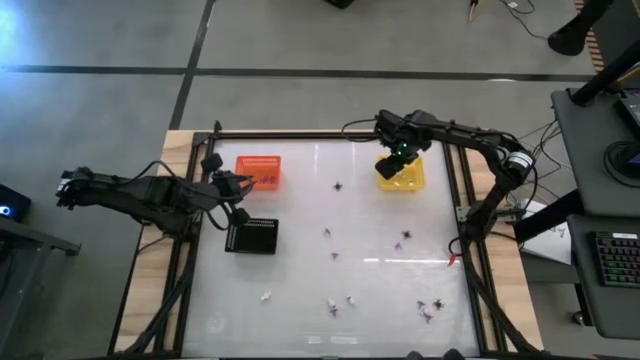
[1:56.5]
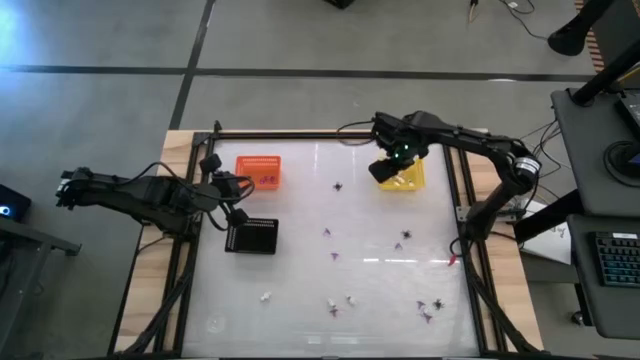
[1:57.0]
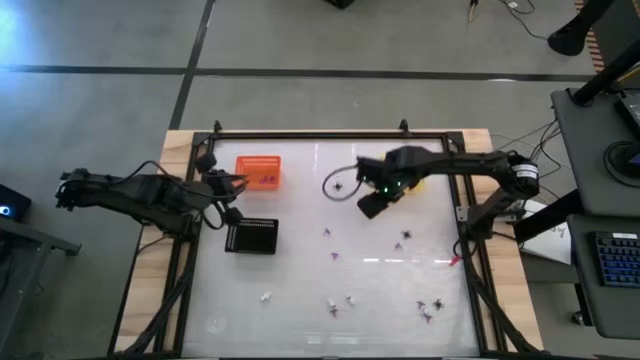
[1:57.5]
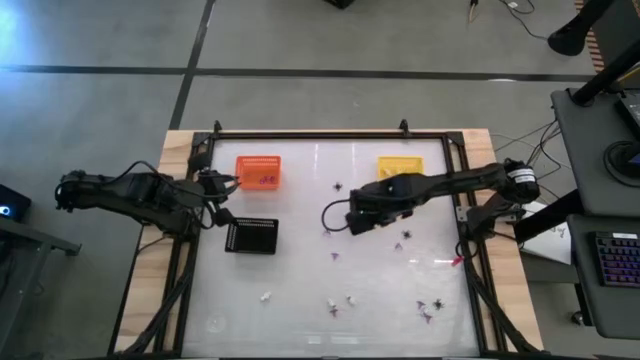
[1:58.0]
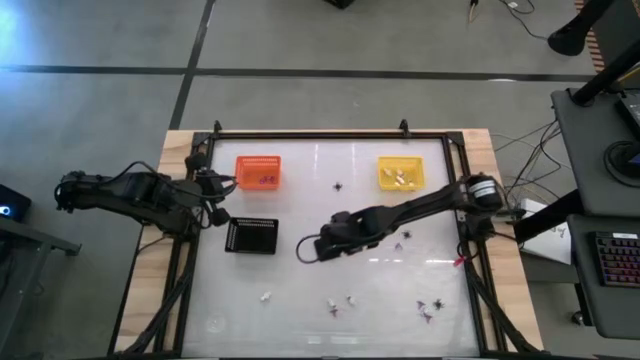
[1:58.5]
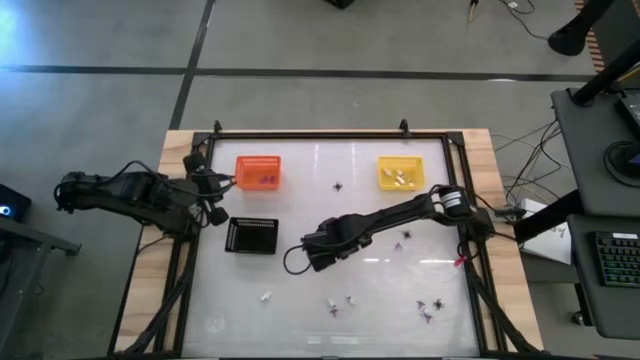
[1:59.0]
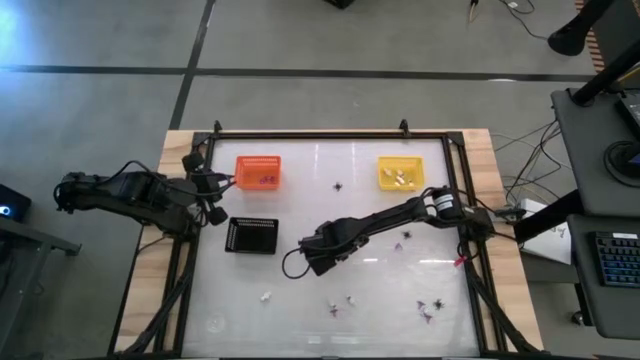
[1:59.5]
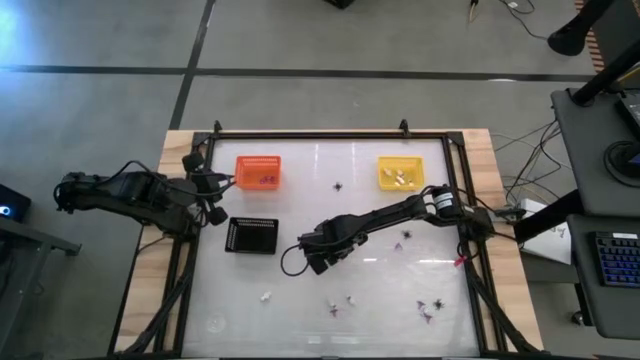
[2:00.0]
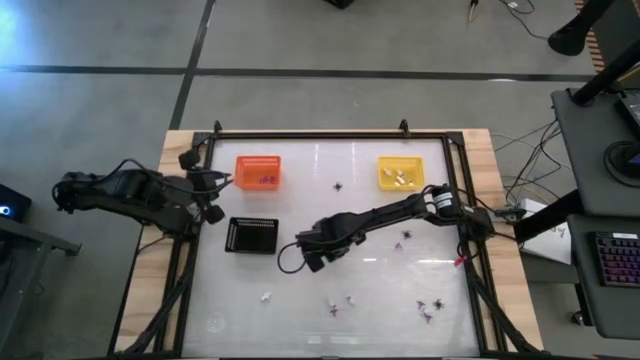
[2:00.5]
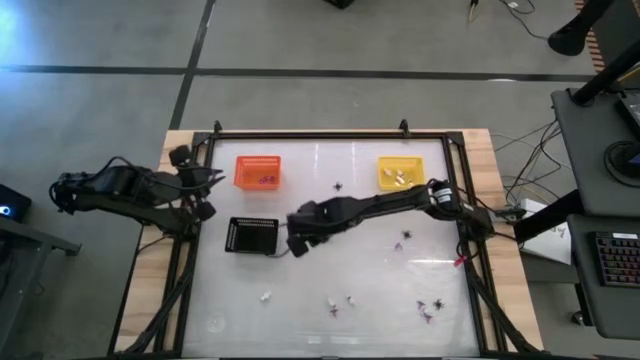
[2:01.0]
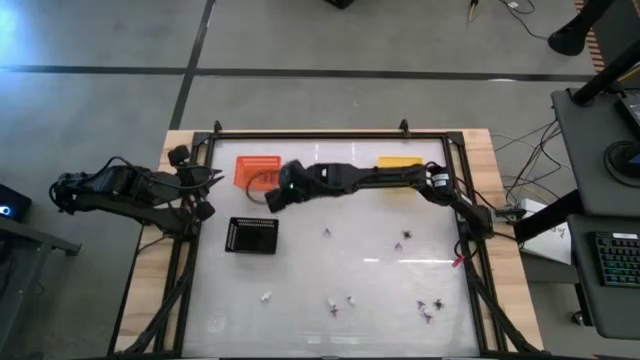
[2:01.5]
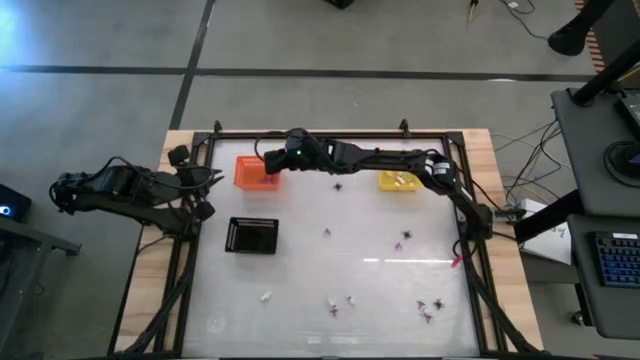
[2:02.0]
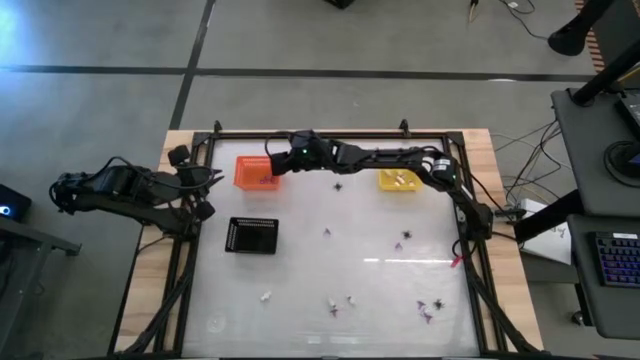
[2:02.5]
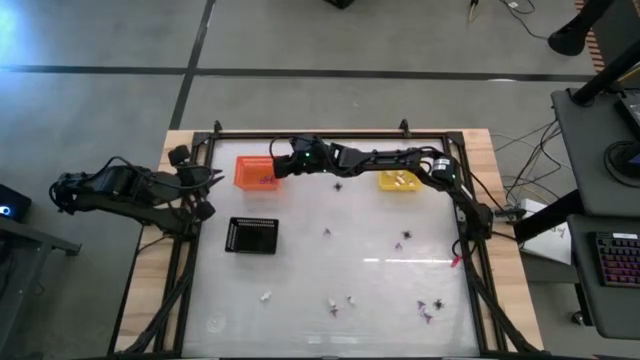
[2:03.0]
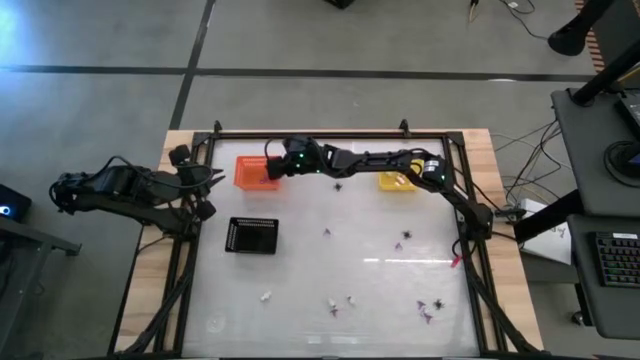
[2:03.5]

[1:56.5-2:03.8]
Task: Sort Halloween decoration
Put the violet witch hat toy into the orange bin

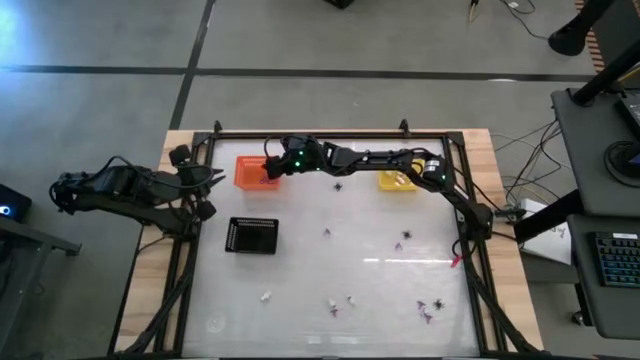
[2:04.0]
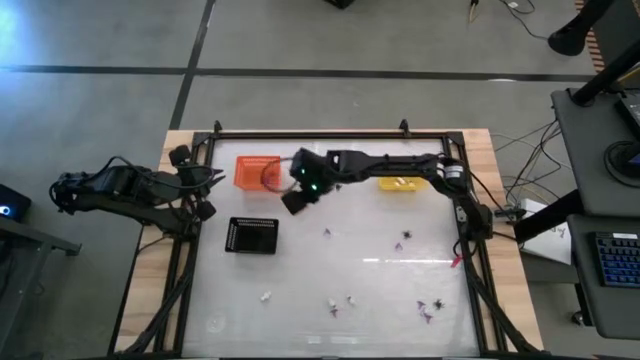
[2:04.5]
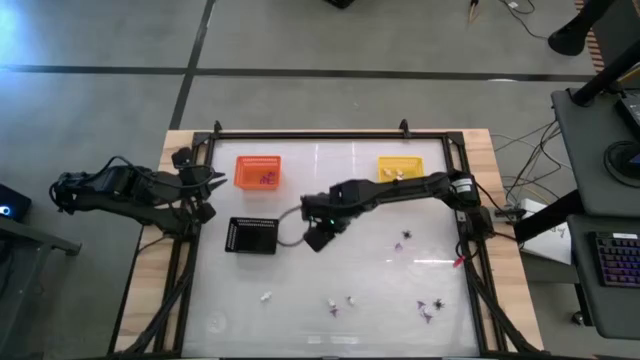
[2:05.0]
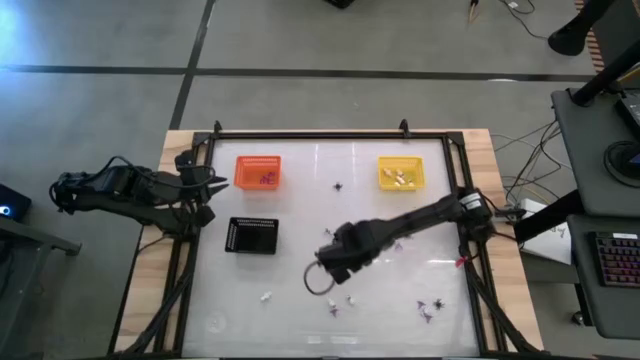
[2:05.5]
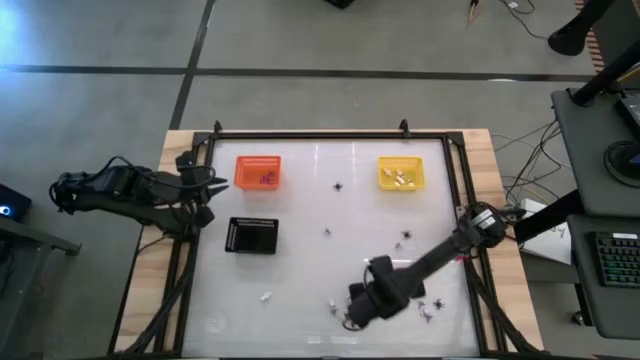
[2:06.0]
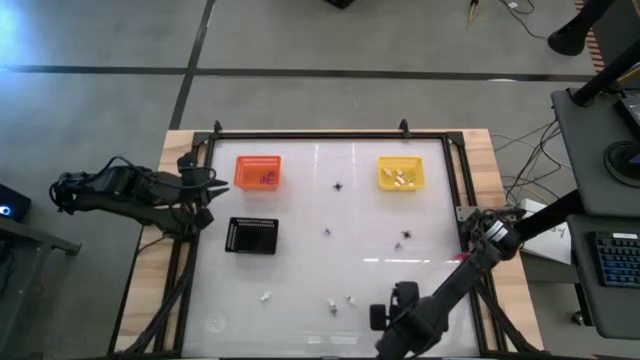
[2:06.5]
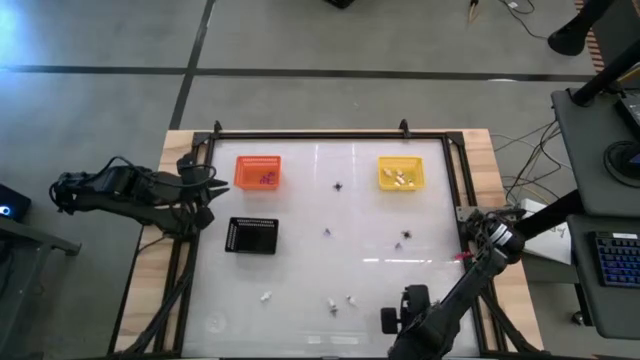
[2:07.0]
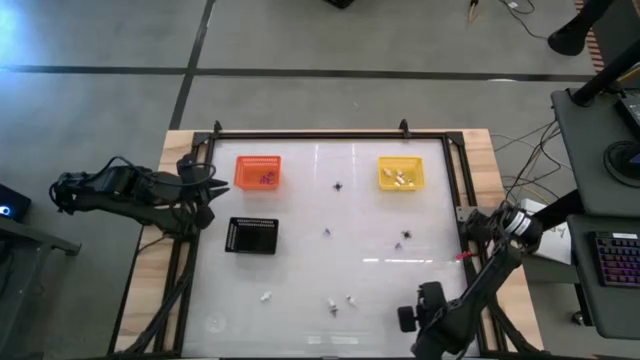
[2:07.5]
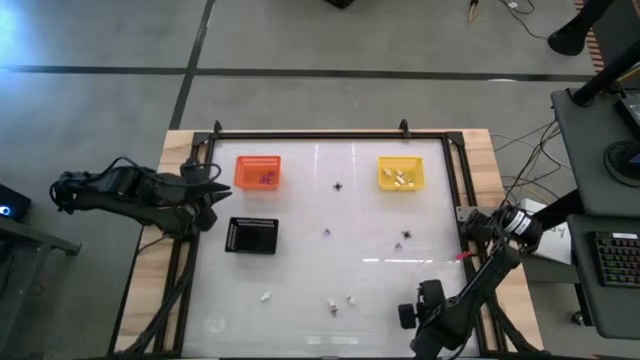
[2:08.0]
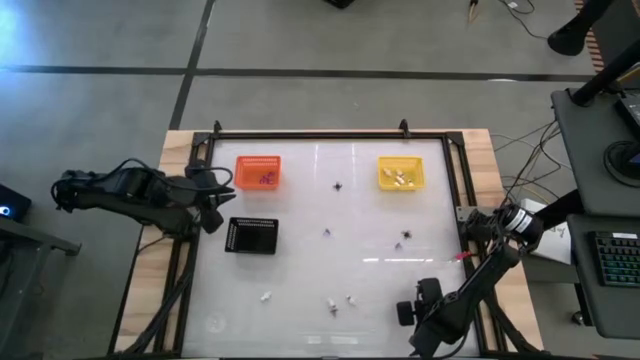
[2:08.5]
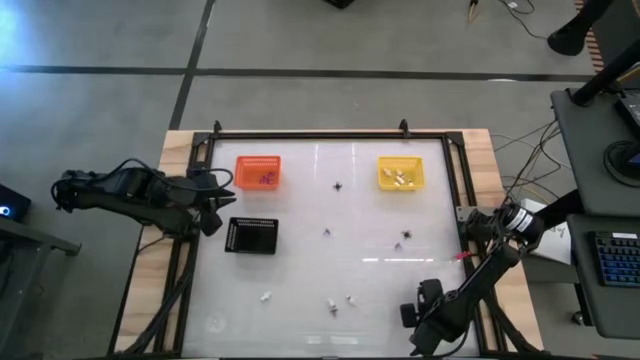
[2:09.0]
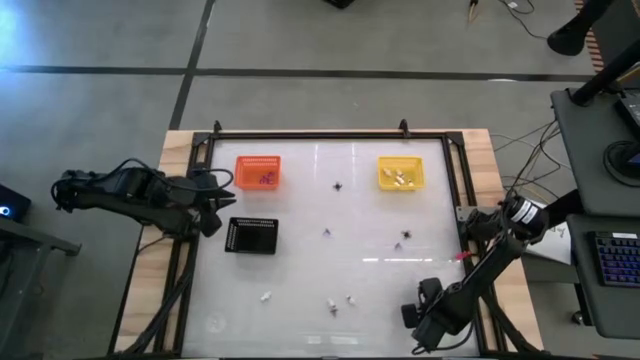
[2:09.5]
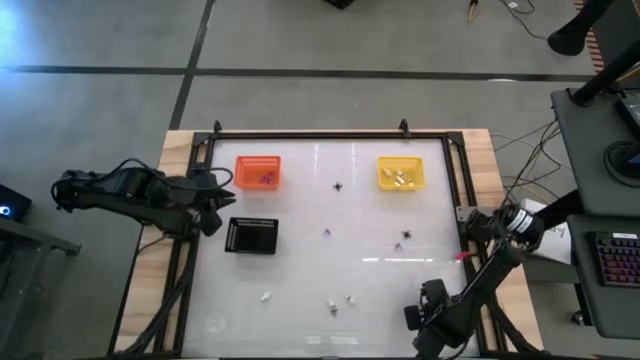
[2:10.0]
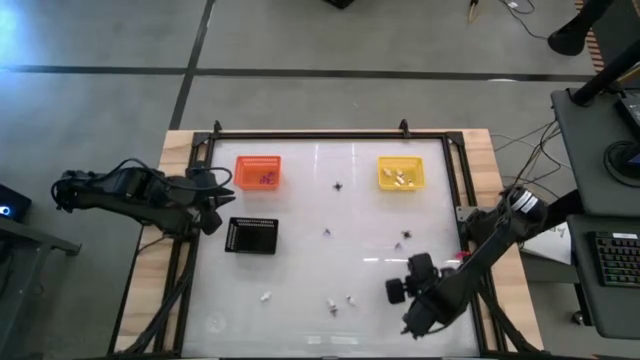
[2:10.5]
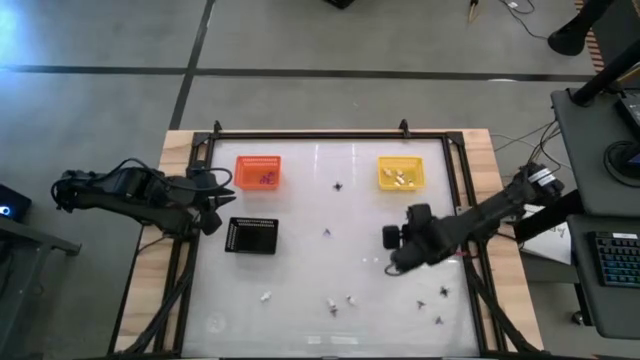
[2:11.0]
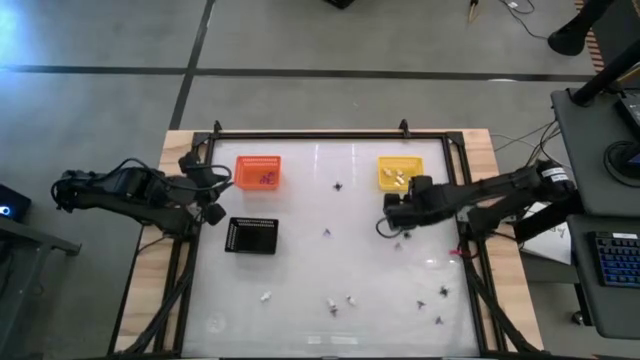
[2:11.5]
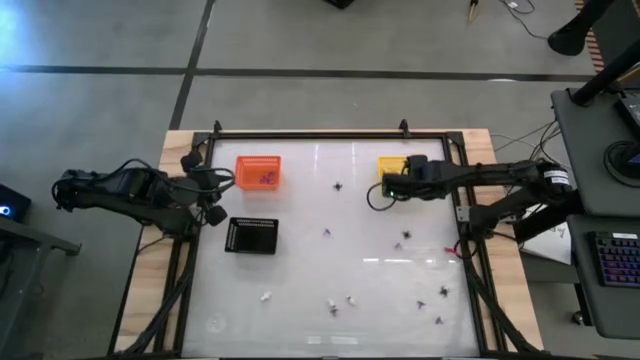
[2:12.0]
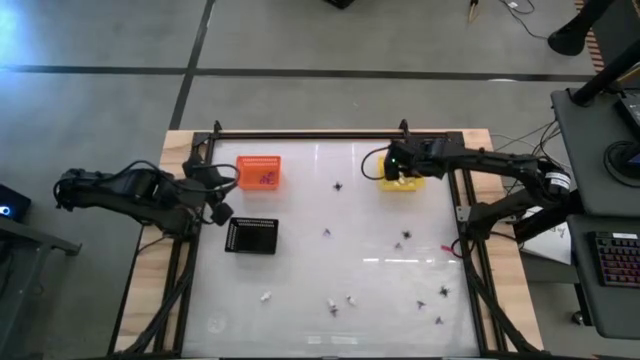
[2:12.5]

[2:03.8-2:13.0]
Put the white skeleton toy into the yellow bin

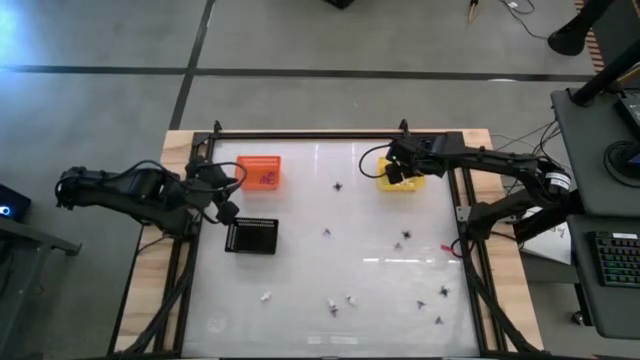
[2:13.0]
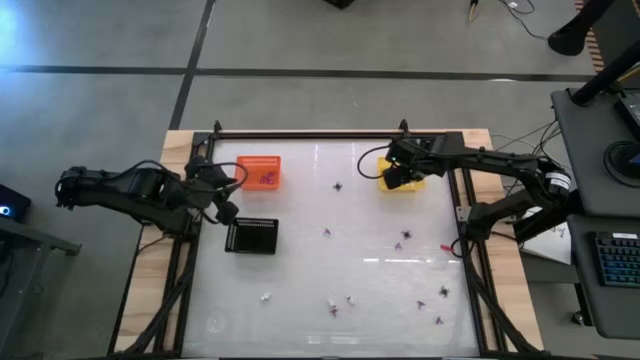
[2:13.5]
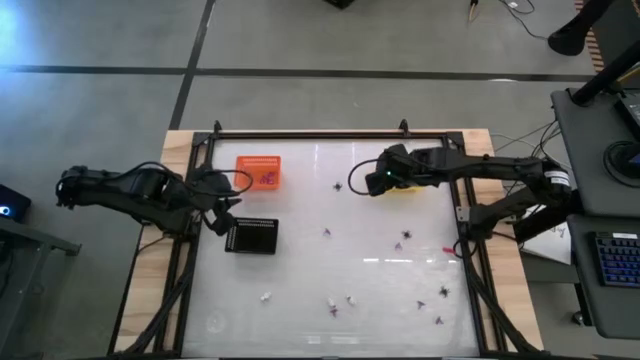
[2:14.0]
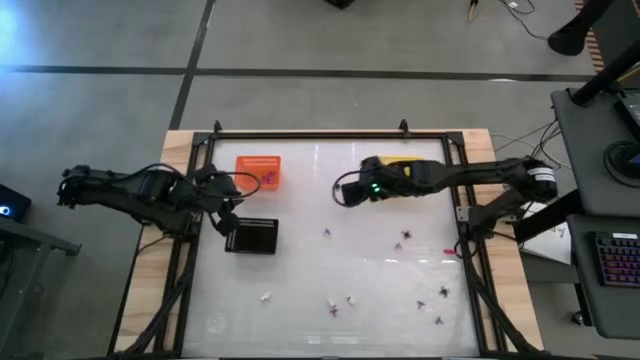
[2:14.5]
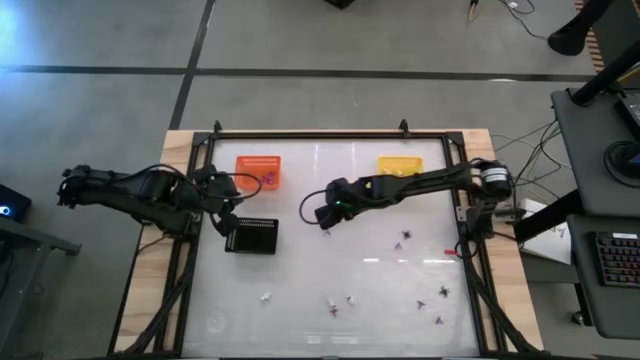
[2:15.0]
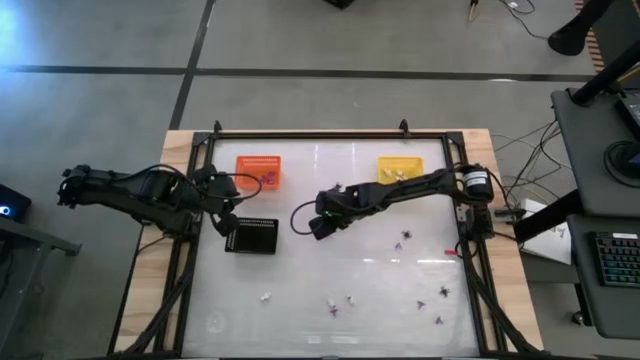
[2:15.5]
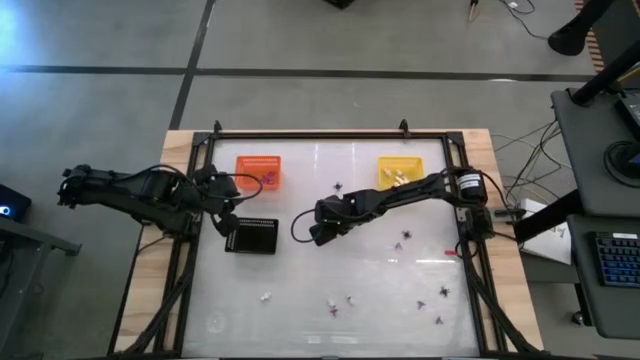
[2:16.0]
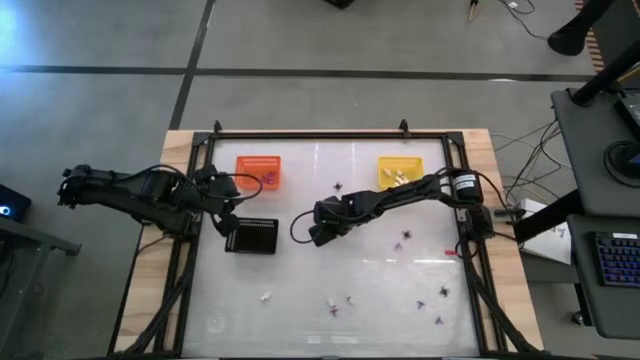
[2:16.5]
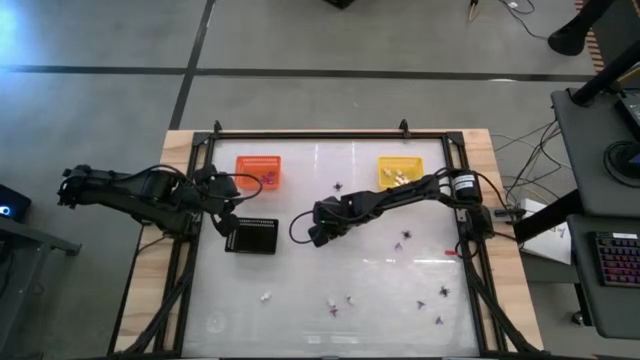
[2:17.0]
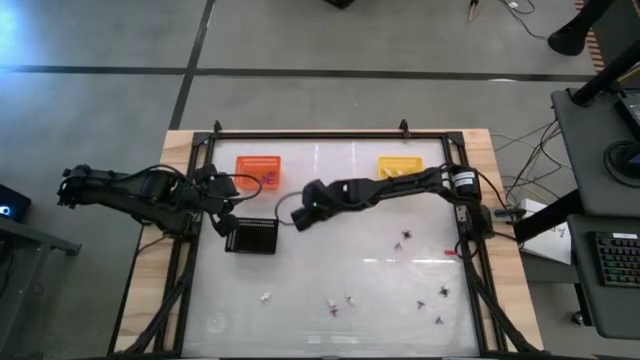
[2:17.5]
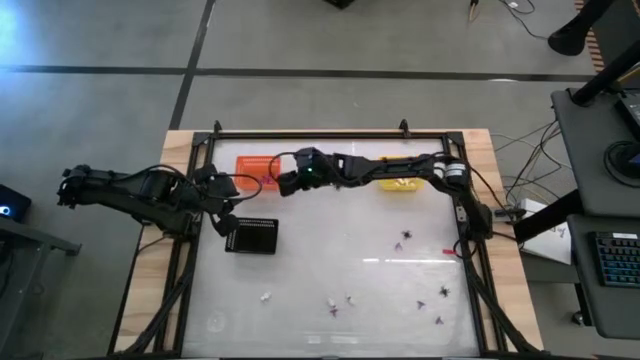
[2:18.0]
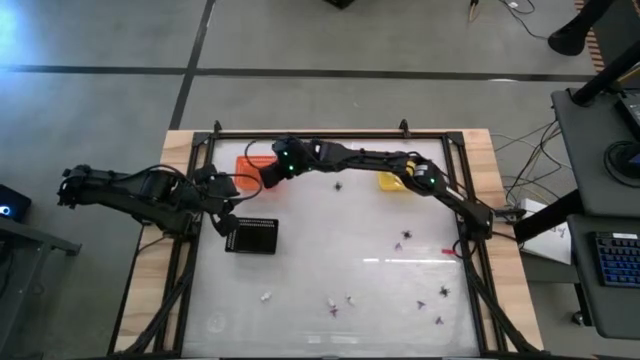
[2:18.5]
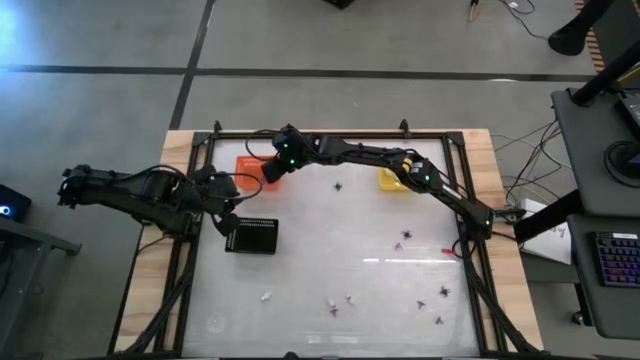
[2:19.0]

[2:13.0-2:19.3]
Put the violet witch hat toy into the orange bin
